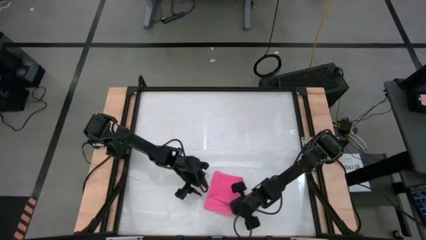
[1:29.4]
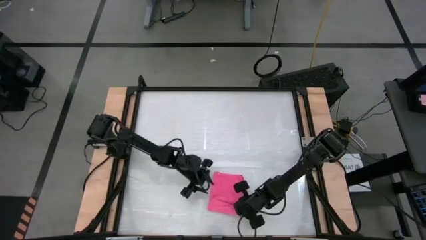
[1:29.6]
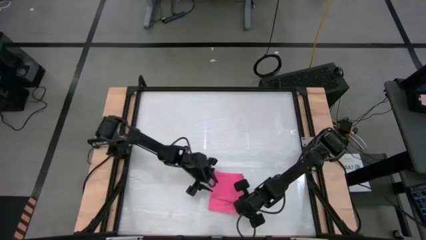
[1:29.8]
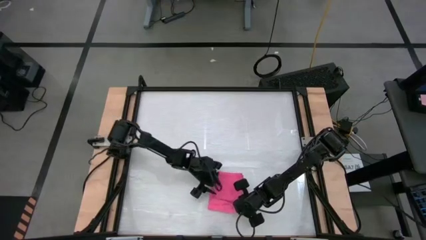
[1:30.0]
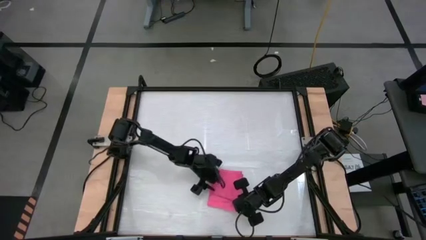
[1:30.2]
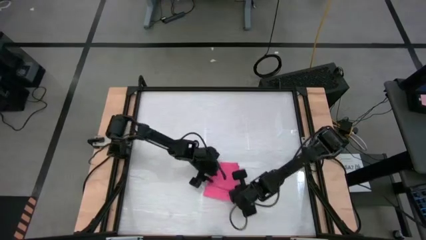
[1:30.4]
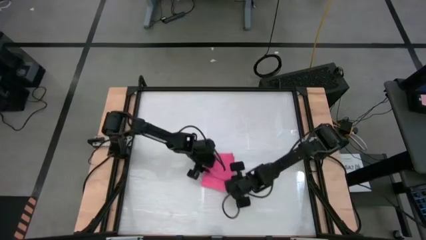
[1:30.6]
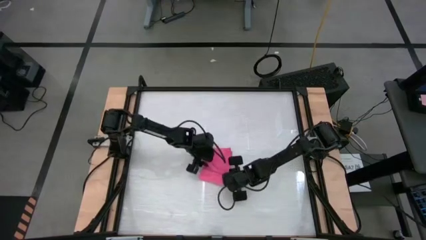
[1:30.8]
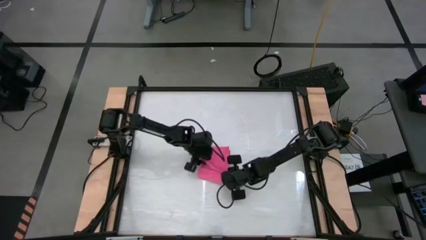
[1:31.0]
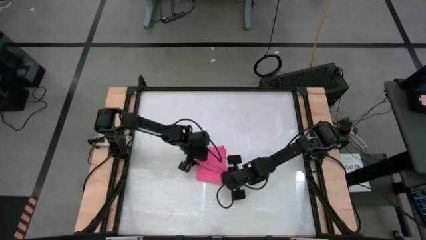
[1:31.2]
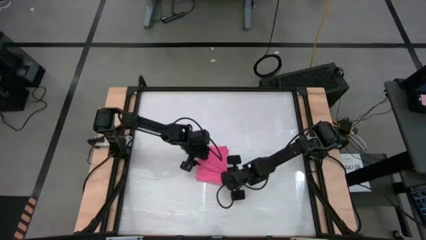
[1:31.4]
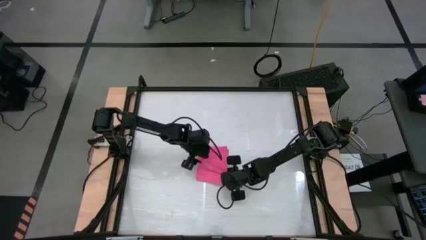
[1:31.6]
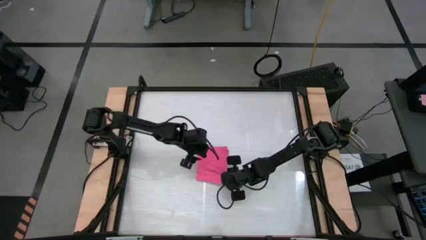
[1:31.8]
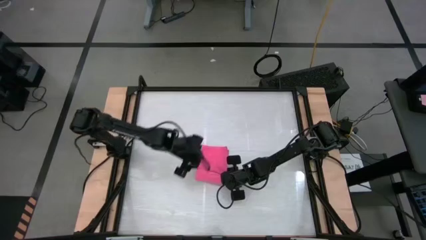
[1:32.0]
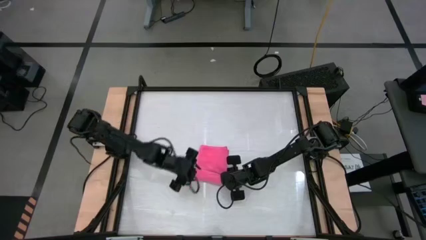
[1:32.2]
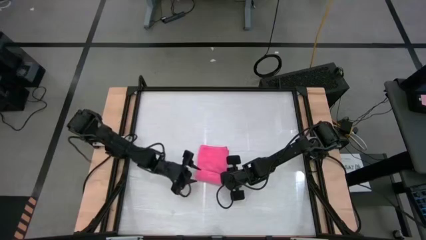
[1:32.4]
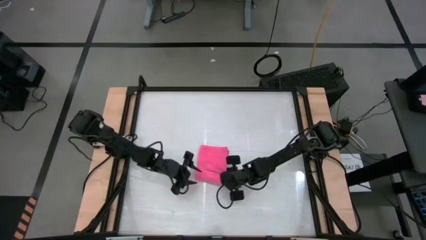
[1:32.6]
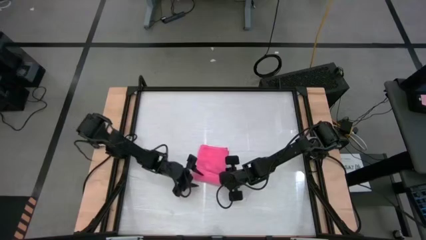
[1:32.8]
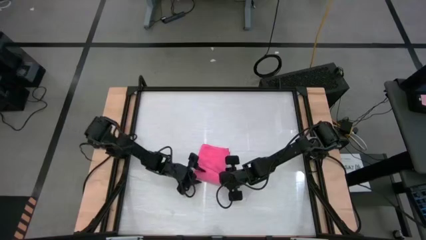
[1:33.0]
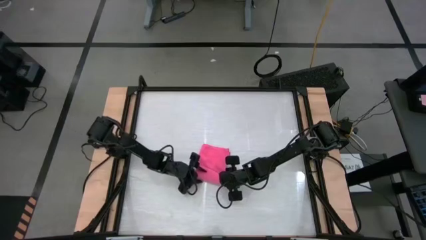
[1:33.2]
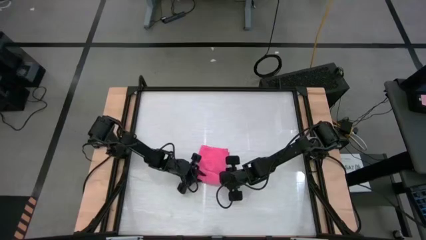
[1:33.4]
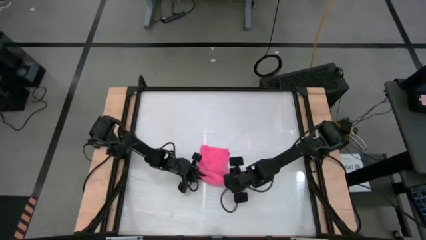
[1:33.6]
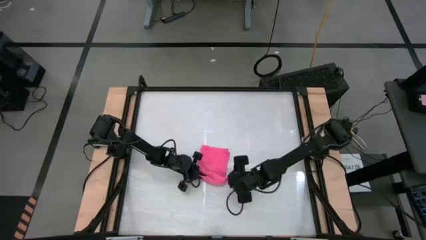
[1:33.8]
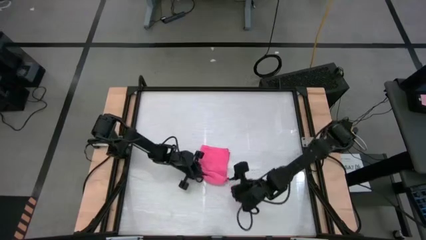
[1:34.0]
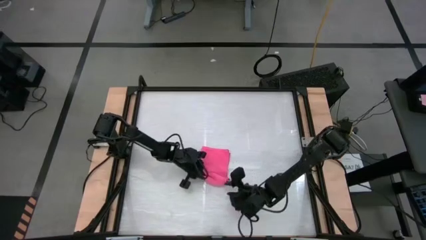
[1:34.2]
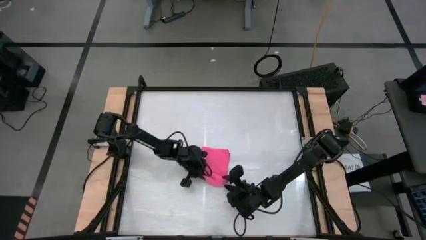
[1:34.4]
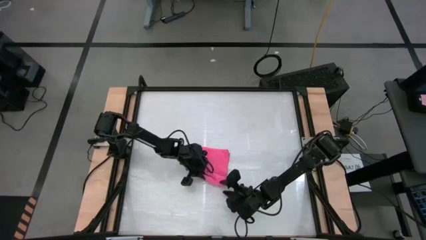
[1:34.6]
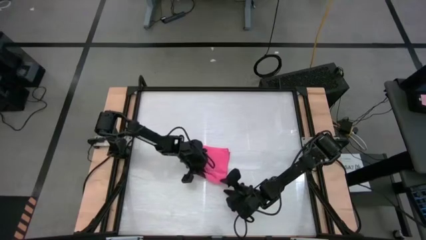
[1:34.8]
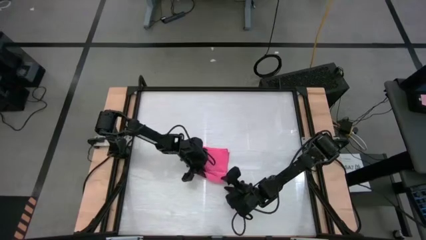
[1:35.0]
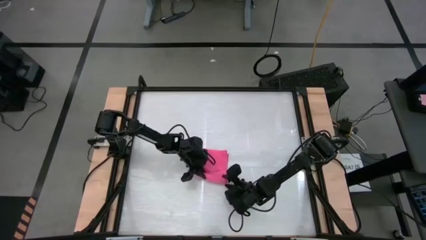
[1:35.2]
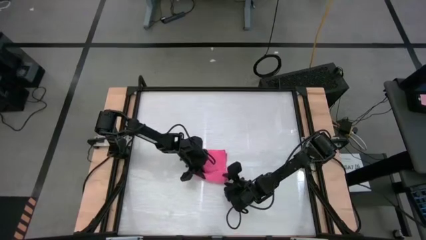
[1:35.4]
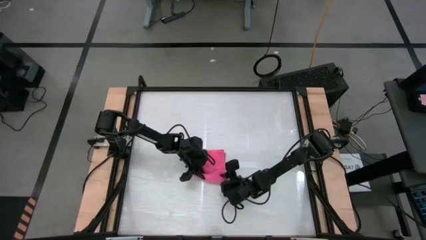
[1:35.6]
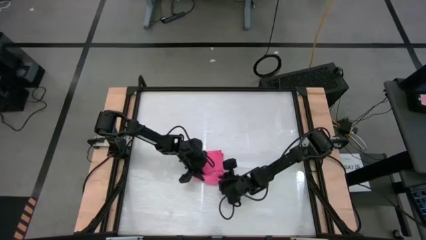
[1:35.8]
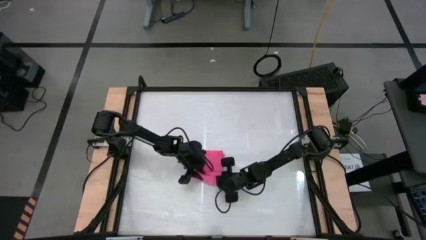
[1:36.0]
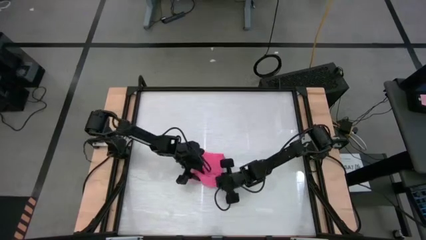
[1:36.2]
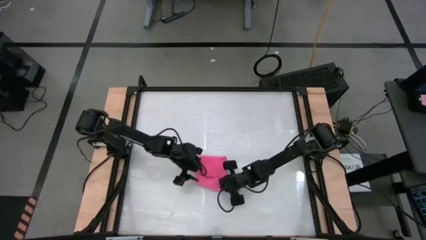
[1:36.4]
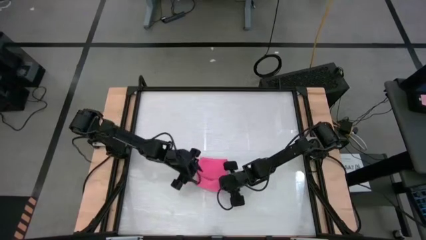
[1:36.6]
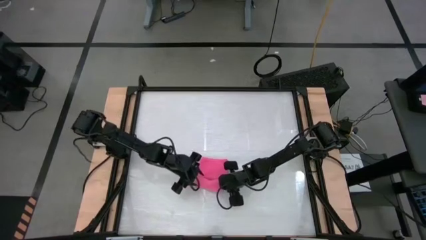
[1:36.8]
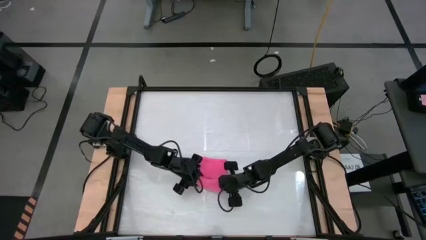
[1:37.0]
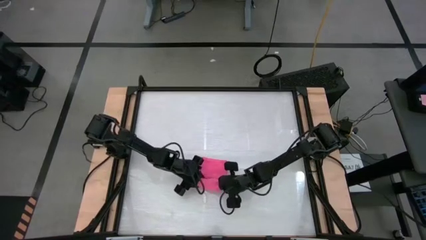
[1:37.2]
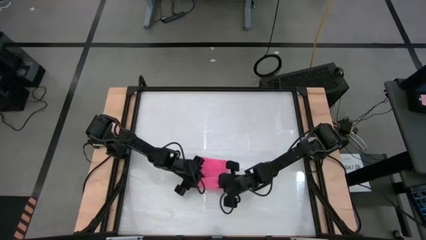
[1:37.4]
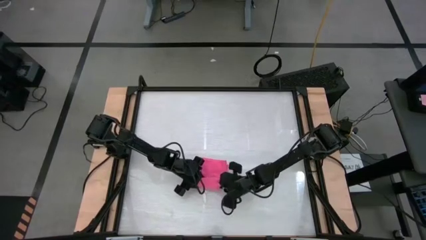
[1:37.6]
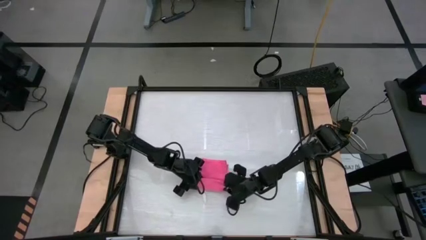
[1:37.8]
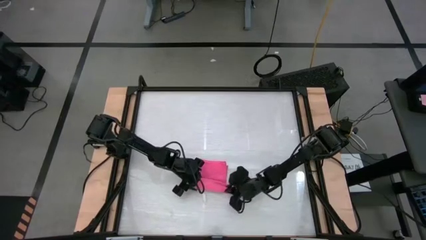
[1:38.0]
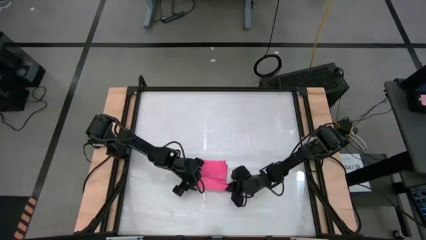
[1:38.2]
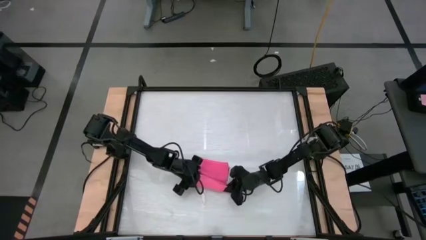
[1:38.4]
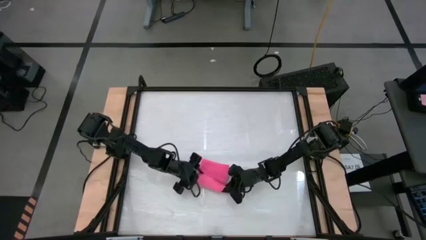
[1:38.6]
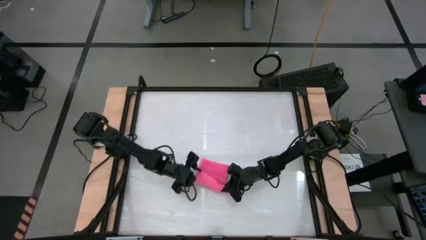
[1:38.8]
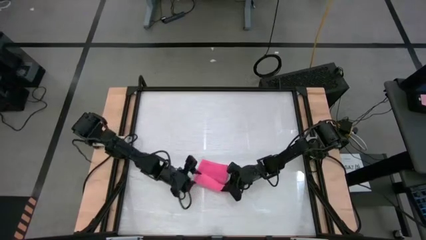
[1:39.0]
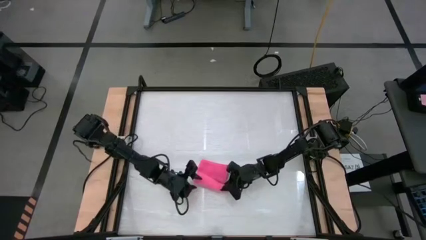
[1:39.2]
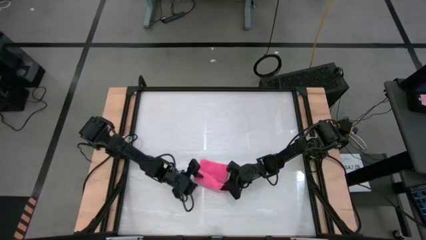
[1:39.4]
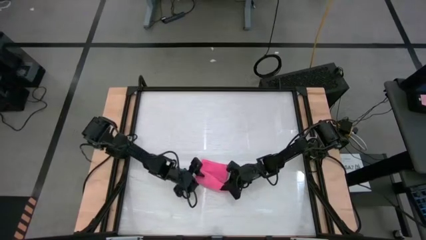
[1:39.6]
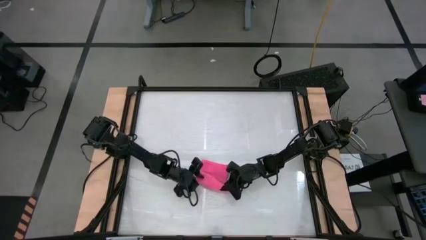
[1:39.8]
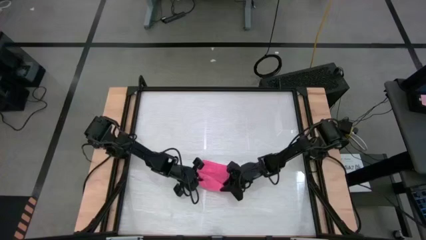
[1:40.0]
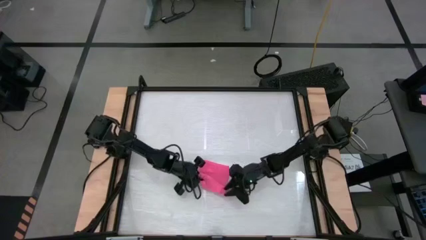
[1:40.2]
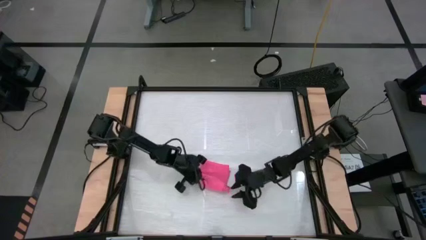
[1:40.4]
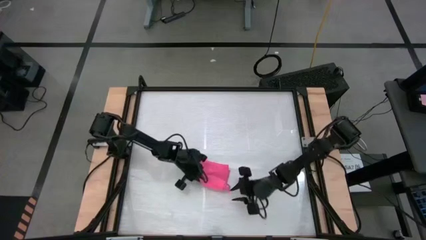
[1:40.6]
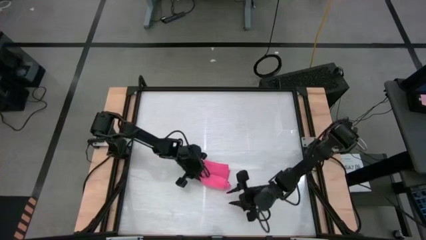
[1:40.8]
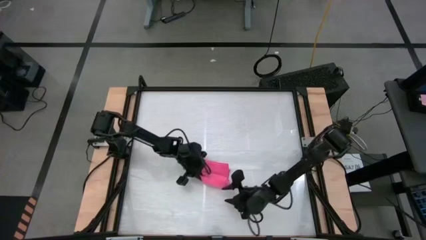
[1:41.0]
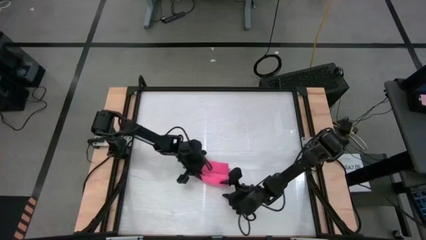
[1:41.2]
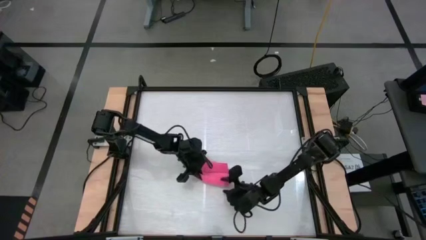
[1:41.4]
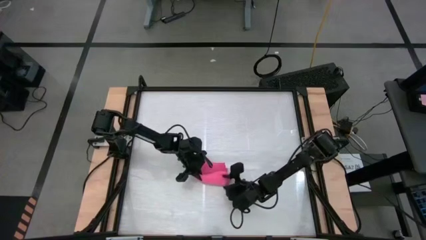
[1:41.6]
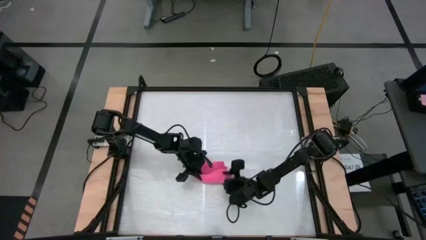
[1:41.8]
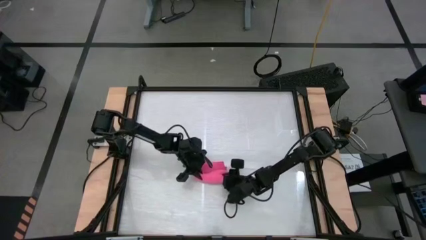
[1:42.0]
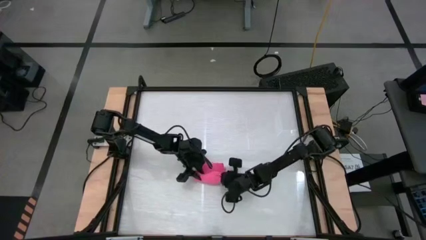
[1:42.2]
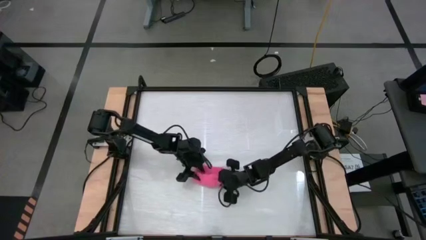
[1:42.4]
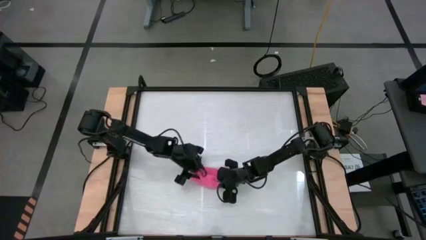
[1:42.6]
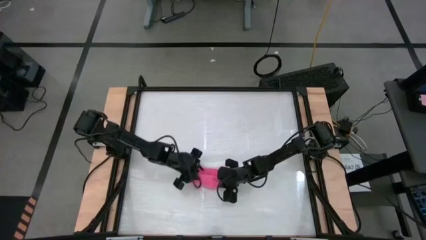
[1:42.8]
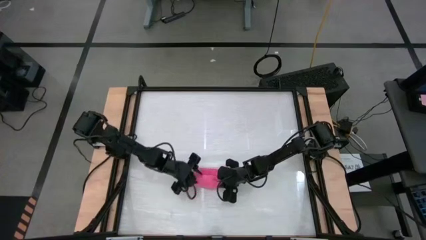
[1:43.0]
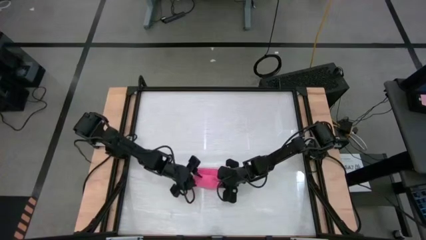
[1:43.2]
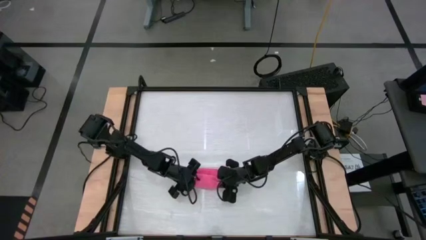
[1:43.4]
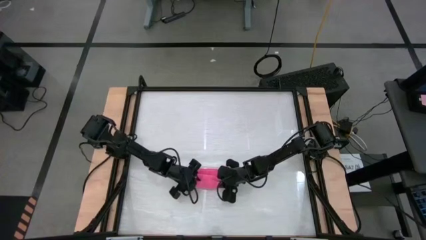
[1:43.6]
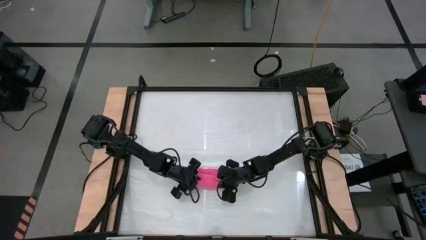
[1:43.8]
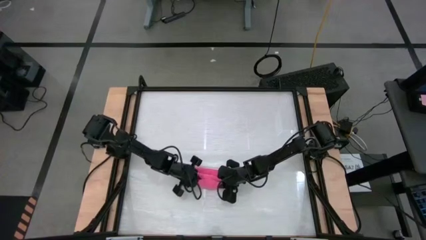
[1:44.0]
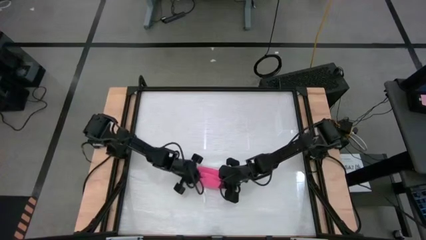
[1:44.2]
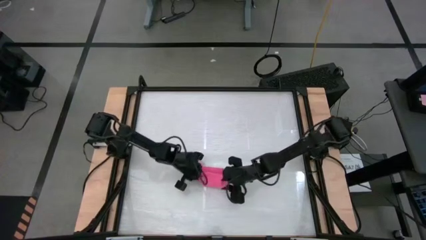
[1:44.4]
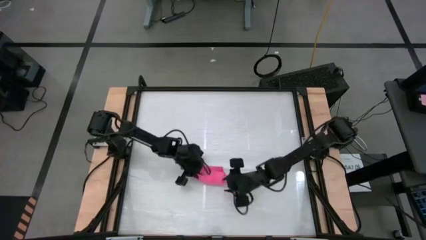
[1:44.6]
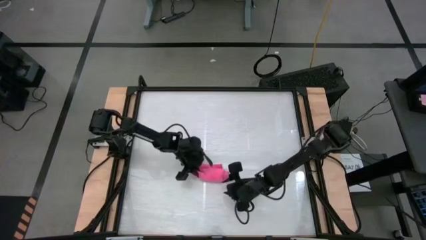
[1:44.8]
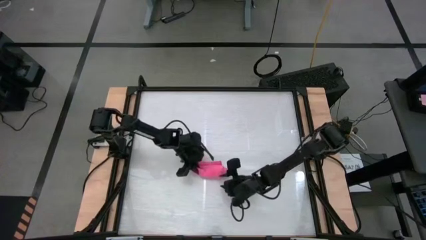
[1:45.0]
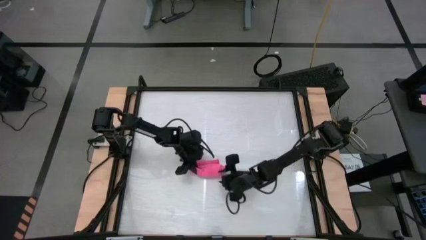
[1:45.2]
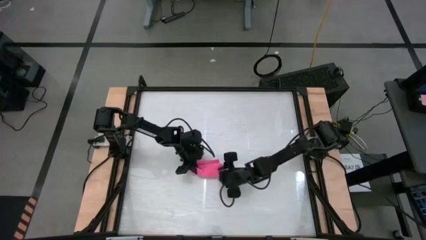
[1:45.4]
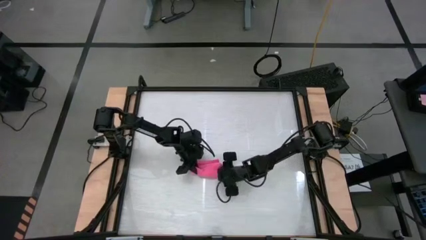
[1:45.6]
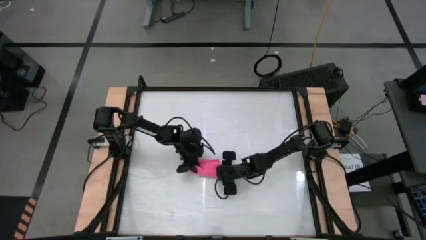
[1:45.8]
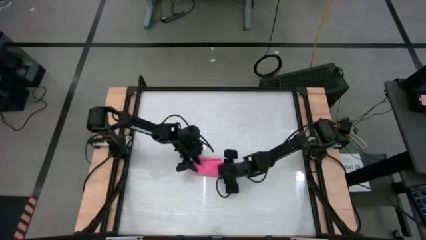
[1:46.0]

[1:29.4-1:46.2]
Task: Roll towel
Roll the pink towel
